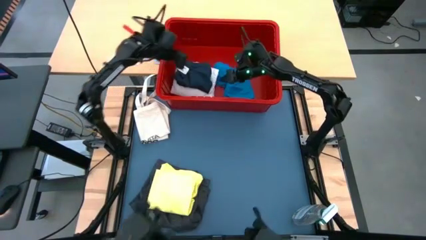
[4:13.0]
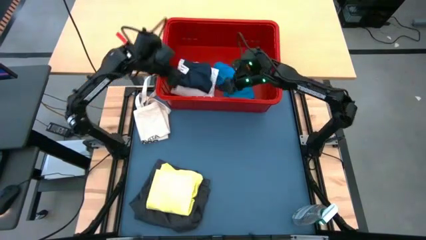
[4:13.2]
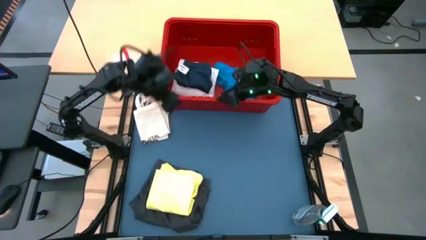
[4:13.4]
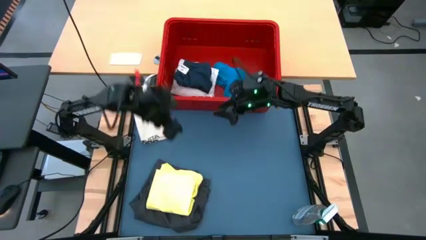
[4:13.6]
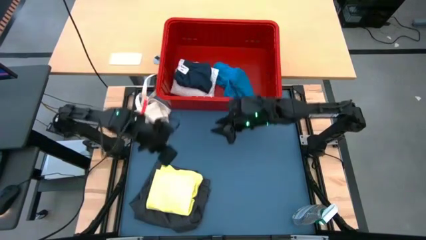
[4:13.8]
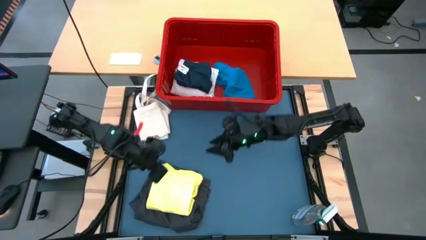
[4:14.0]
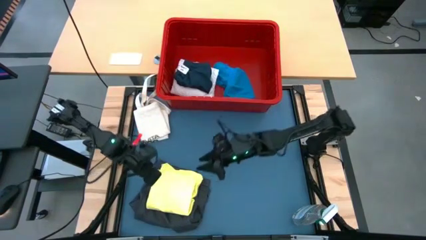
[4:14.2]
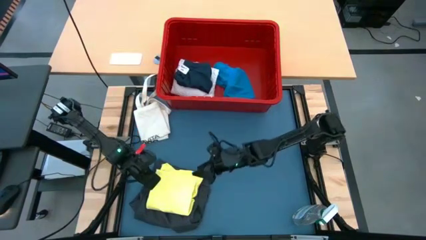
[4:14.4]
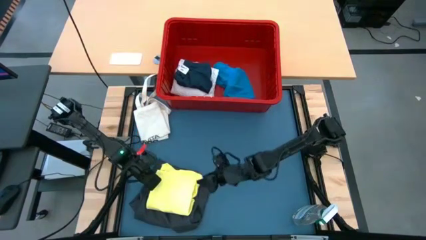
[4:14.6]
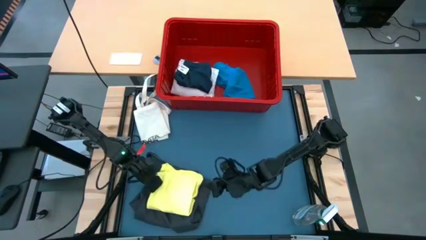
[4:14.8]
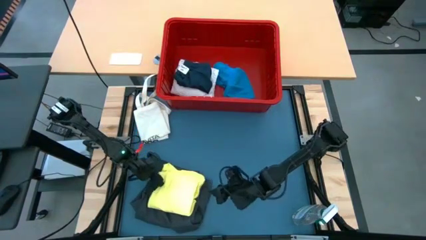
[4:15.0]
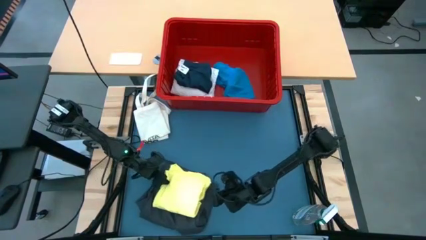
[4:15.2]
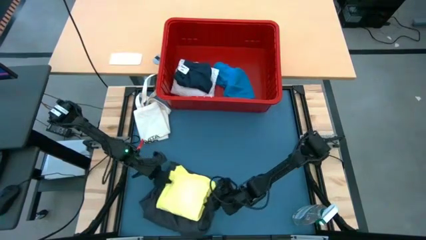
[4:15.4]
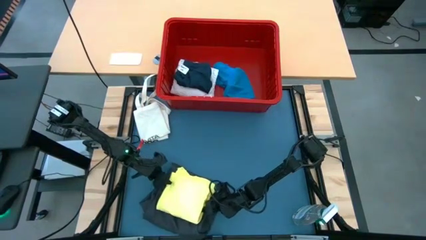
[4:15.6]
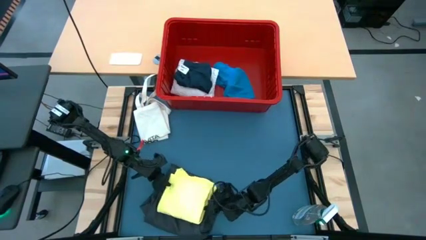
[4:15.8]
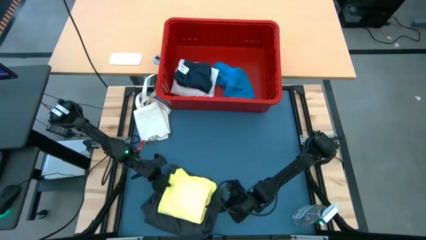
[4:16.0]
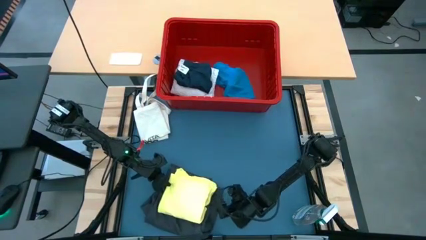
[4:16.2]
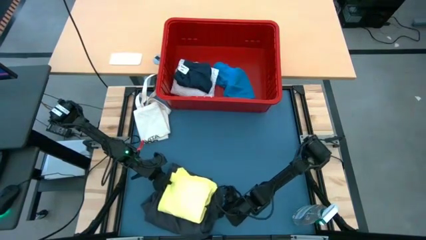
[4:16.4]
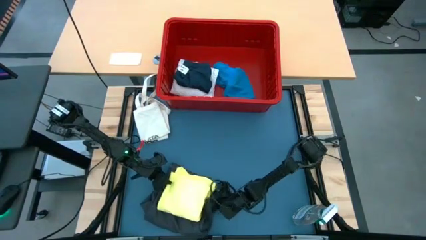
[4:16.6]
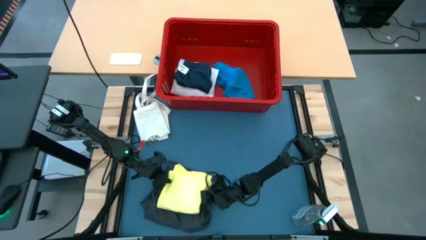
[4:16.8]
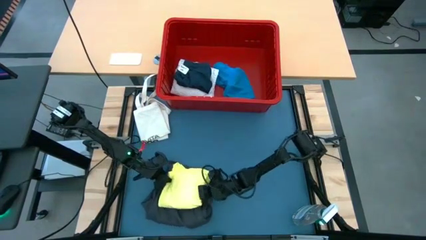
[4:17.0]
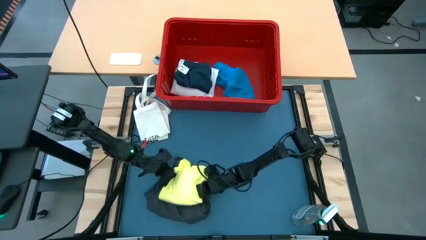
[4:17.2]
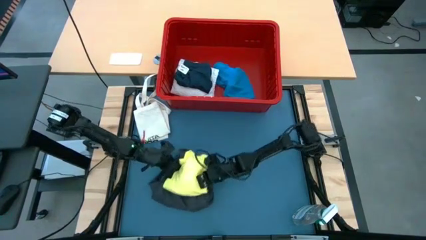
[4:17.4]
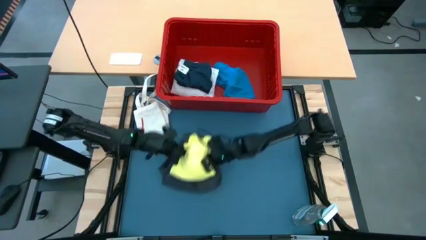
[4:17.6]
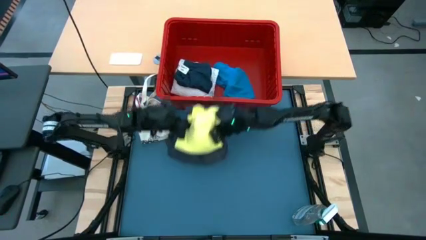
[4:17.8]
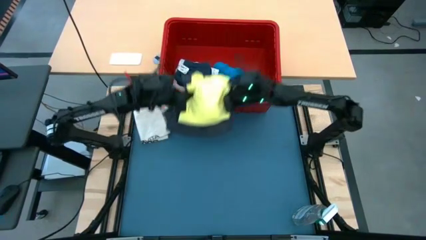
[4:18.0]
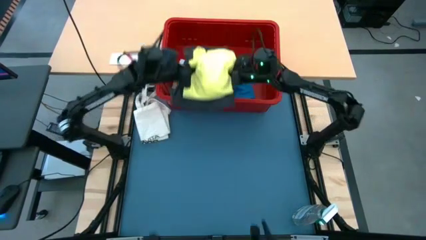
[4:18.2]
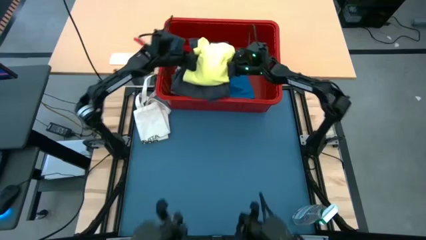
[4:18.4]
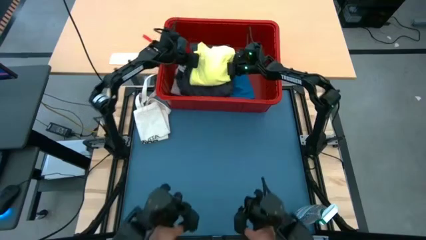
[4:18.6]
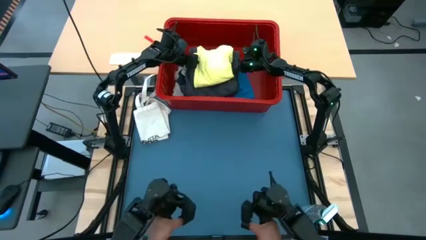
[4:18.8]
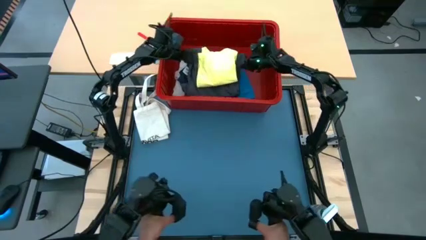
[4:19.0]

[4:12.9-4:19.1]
Task: Fold laundry
Put the stack of clothes into bin

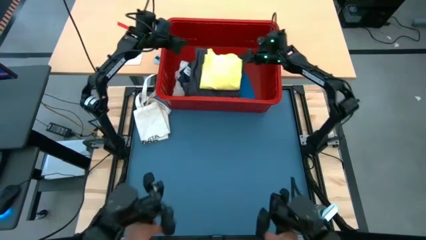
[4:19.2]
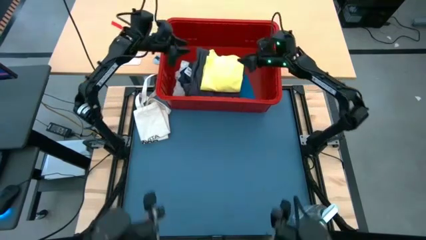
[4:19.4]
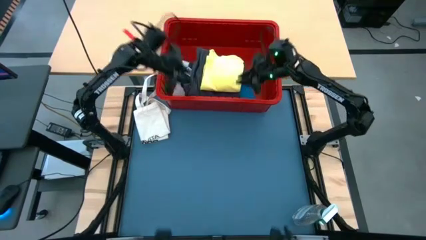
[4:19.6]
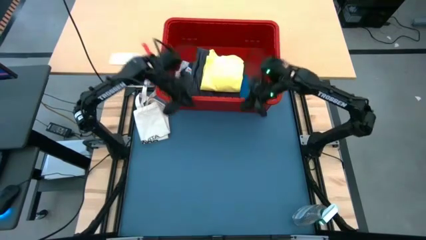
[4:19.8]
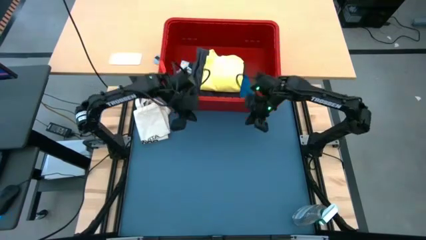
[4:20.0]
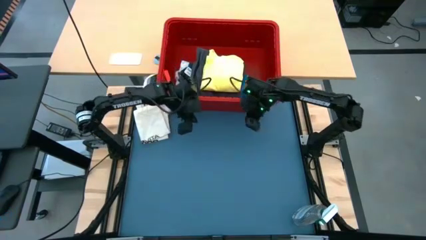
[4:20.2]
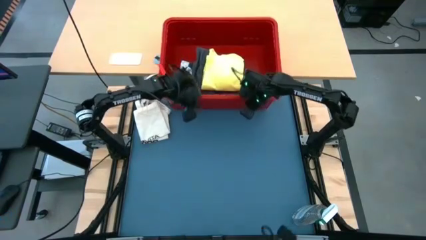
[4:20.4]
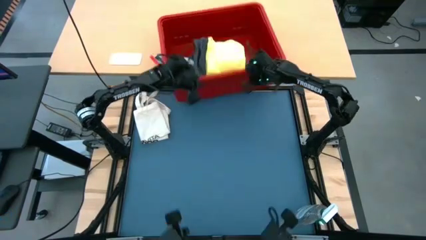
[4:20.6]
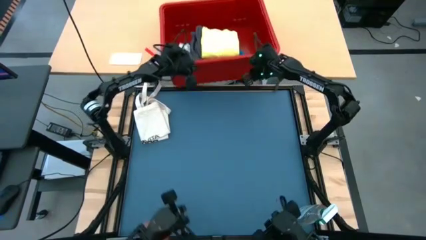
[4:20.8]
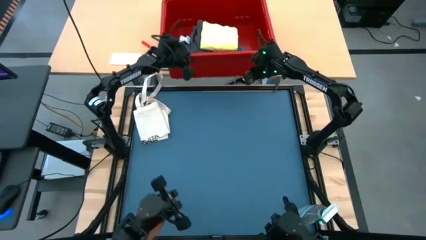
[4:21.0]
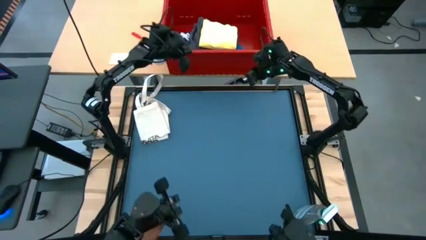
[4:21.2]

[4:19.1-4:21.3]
Adjust the bin to the top table

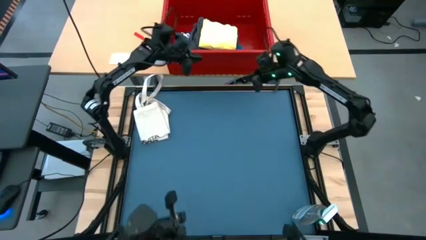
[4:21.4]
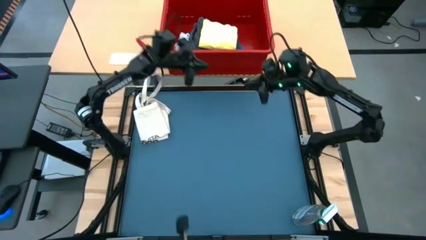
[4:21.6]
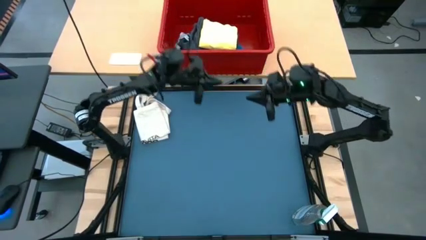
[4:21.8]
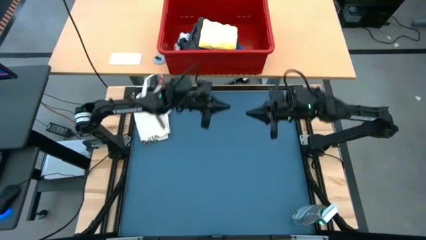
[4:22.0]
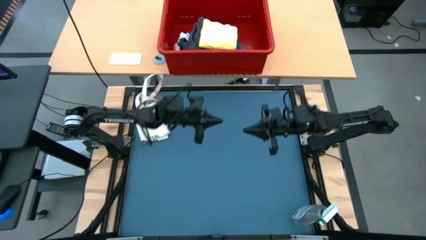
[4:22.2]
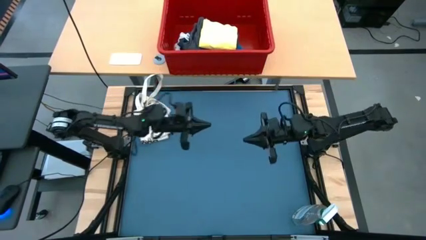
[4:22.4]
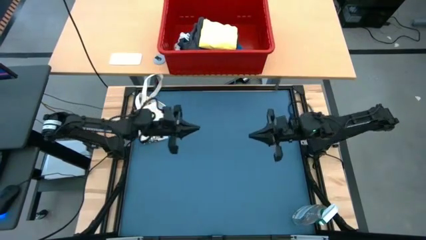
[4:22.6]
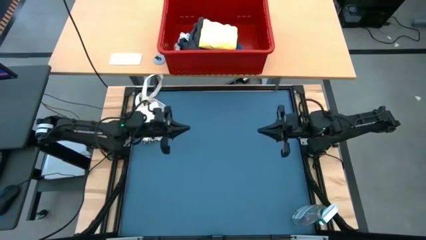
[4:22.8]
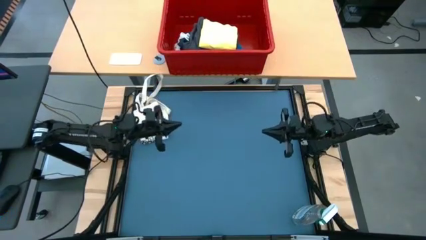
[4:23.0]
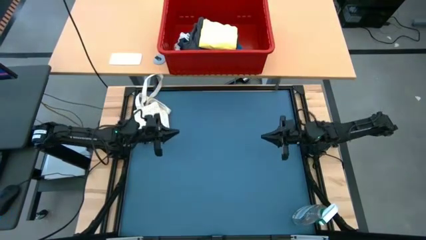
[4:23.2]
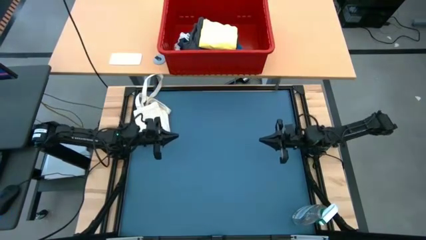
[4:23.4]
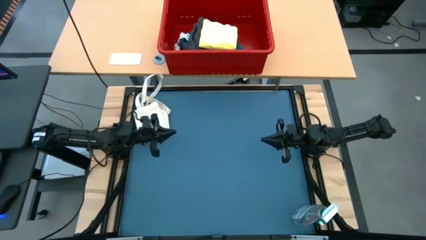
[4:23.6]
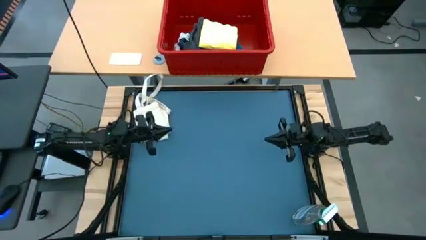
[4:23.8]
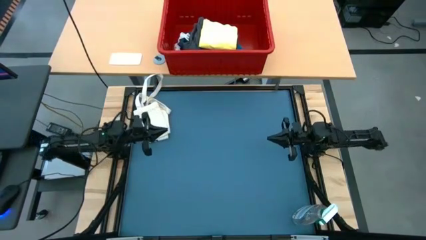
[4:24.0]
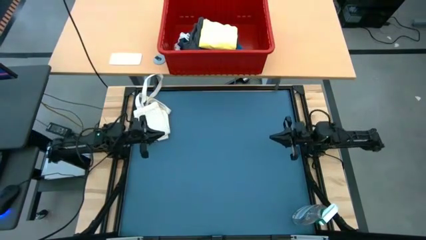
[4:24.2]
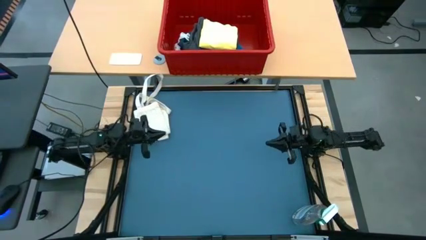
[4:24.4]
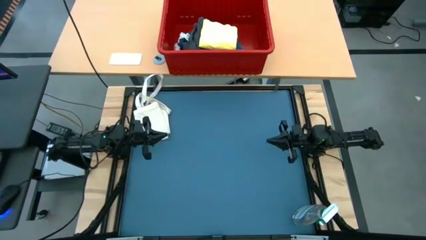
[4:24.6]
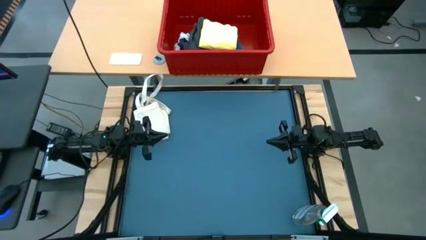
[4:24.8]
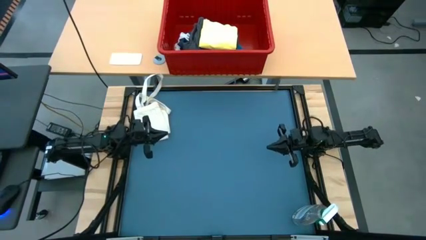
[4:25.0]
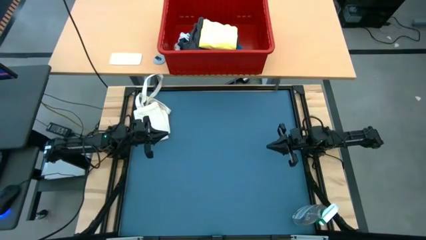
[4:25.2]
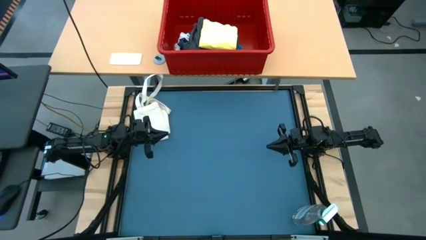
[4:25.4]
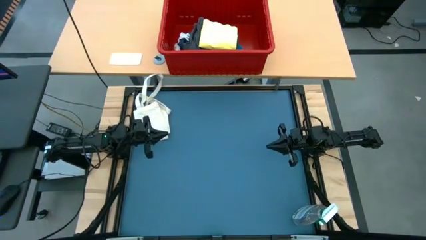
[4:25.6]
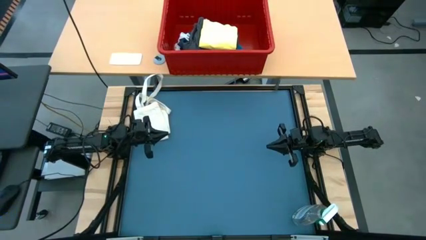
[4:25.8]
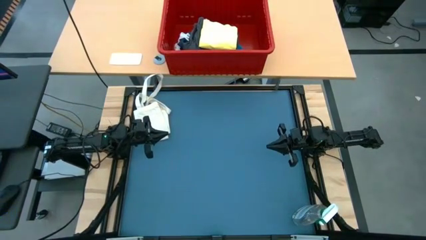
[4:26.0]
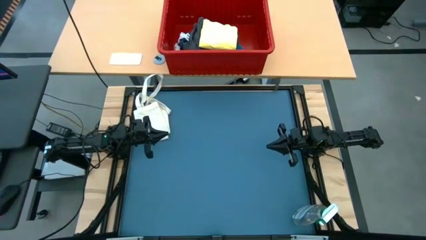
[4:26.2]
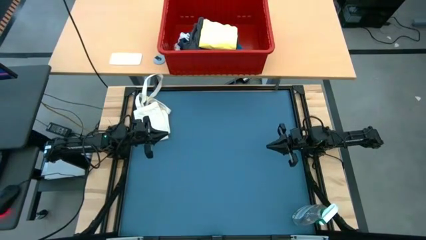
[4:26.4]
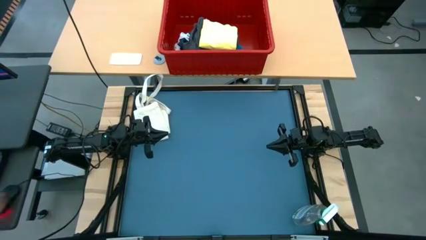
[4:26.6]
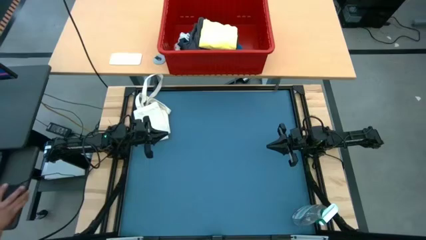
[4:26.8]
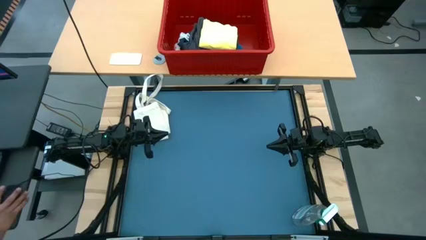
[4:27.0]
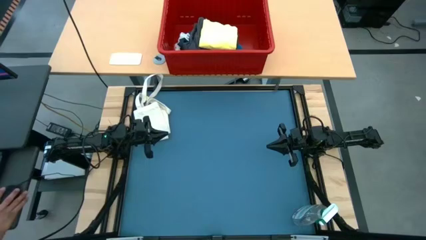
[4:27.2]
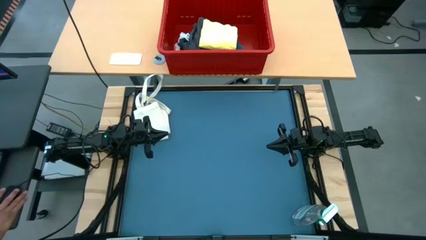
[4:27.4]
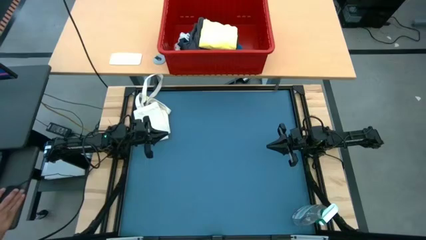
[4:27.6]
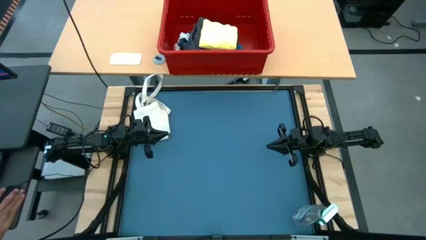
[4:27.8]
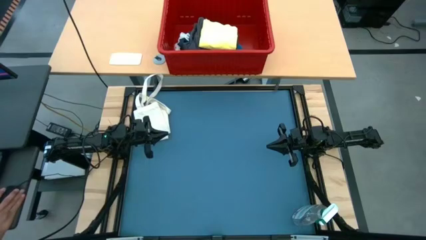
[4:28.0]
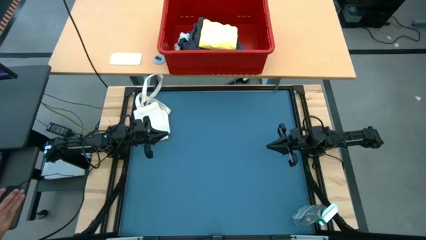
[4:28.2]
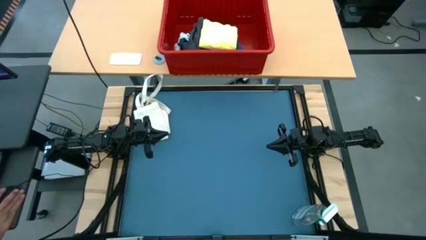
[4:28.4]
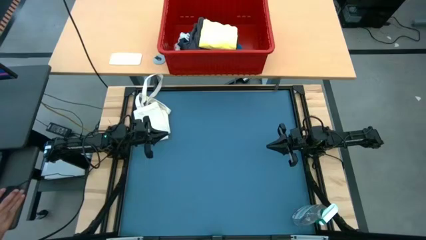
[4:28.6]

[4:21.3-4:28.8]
Return to Home Position
